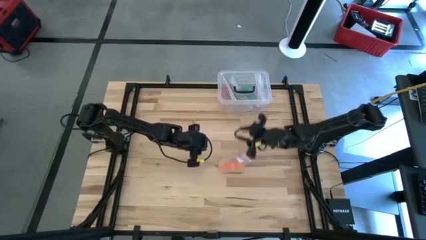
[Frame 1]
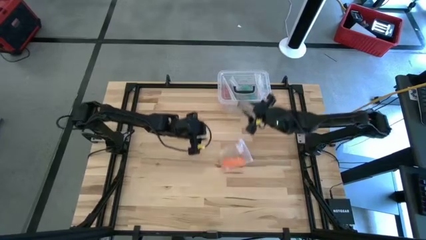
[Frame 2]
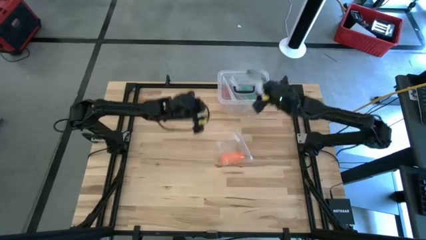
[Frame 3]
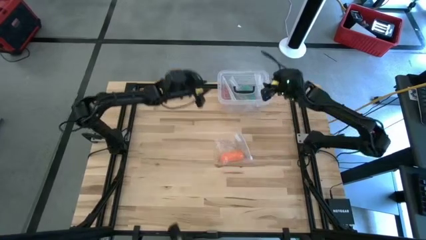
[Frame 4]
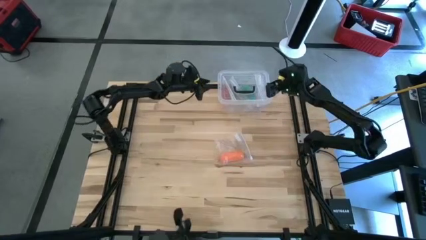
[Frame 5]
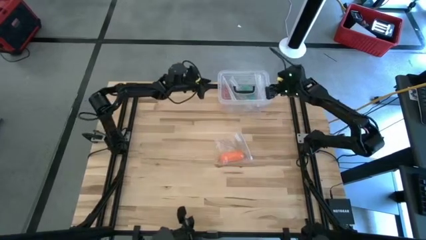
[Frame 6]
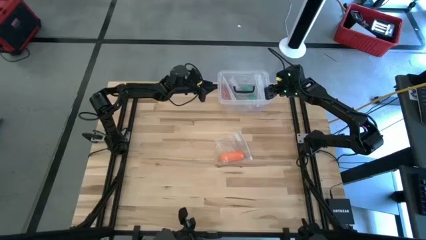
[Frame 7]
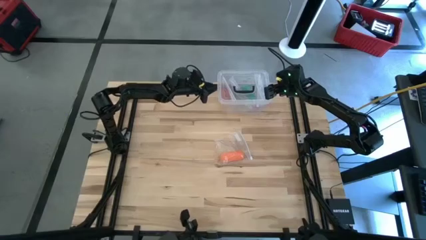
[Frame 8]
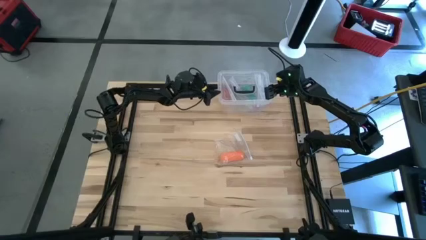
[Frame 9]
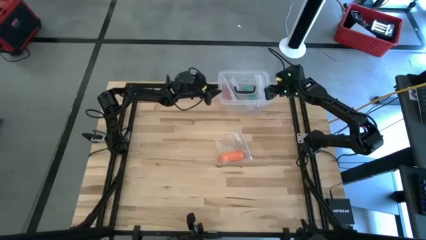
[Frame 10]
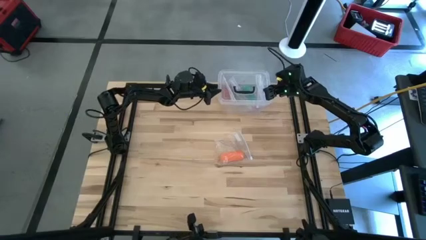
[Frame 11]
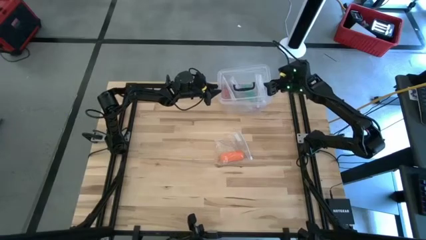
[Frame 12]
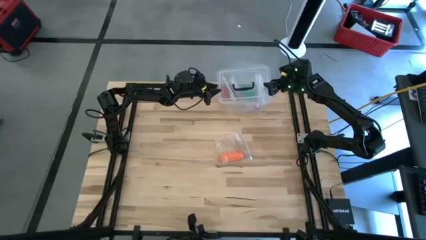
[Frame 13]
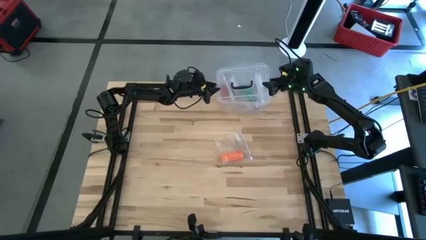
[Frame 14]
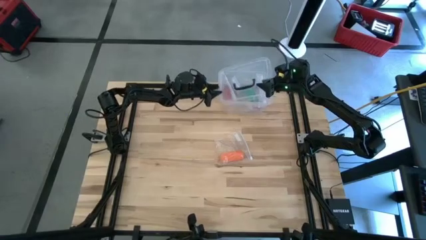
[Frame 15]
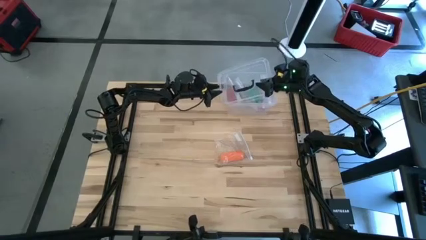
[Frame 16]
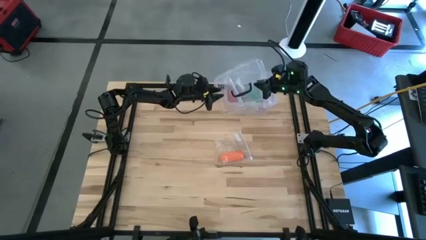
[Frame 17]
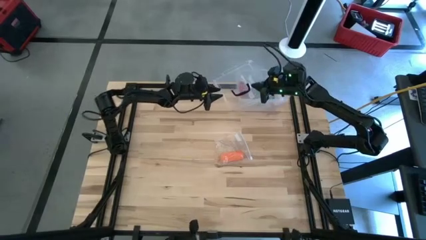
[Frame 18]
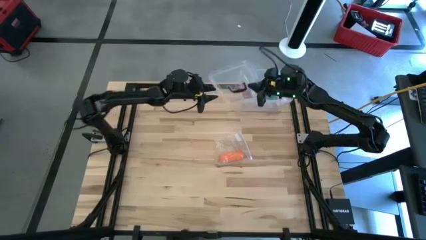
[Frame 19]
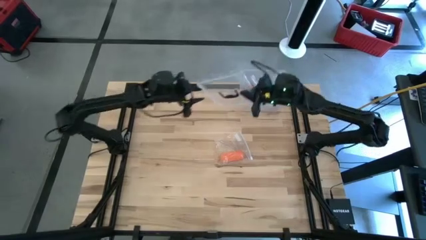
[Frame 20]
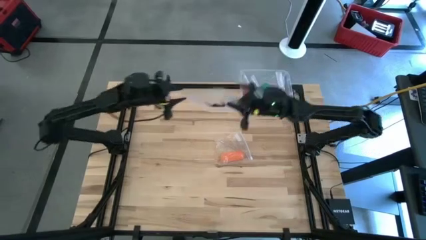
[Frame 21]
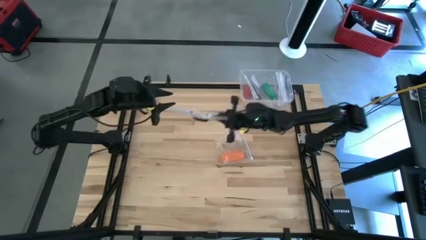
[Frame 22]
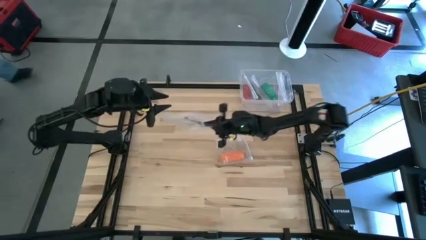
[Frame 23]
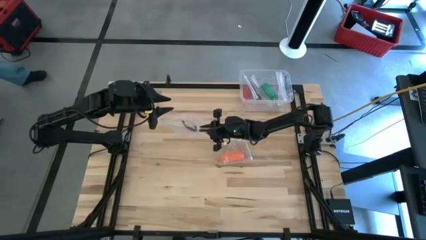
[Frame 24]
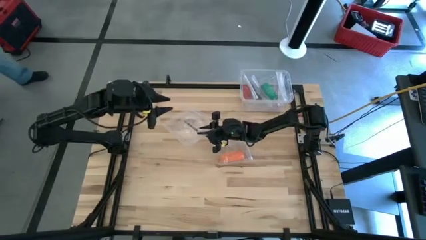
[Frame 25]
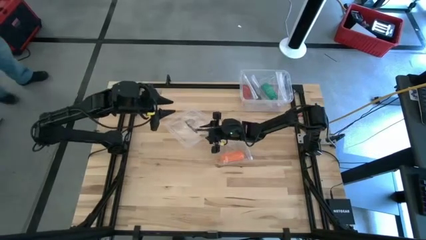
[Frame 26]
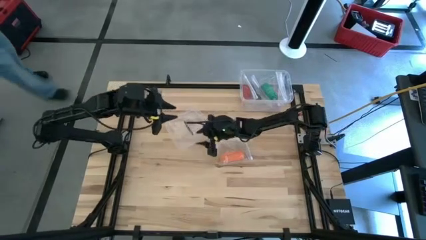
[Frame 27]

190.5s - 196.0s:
Task: Roll bandage
Open the transparent bin

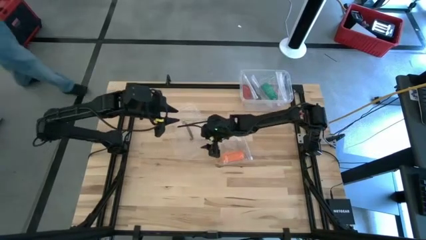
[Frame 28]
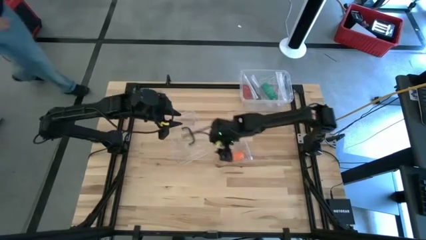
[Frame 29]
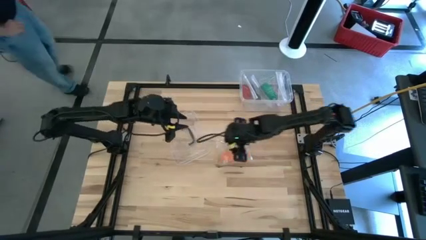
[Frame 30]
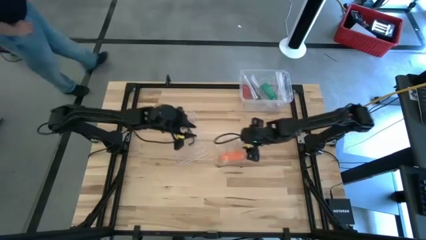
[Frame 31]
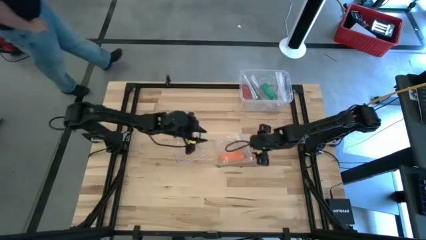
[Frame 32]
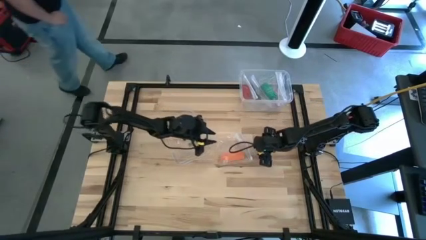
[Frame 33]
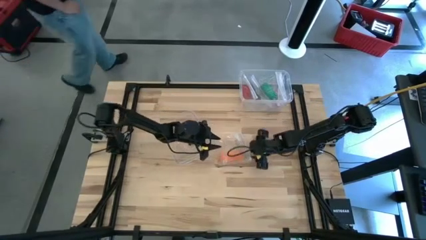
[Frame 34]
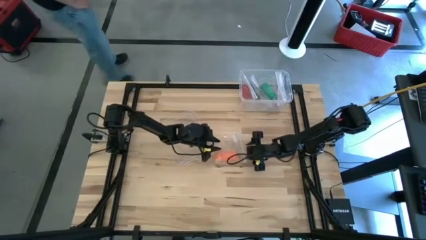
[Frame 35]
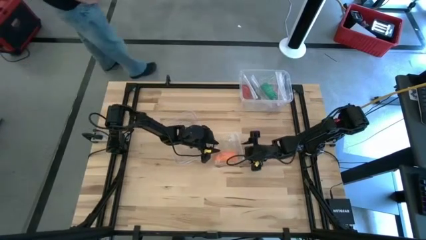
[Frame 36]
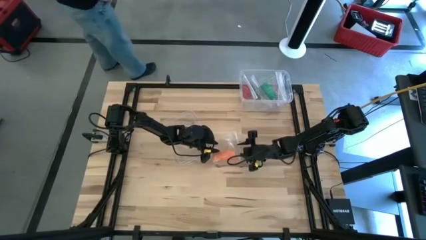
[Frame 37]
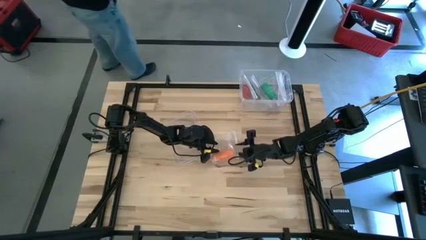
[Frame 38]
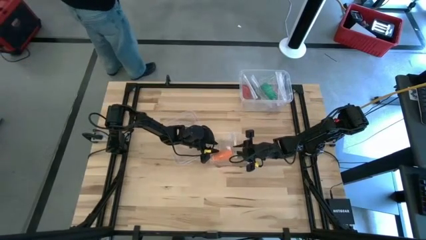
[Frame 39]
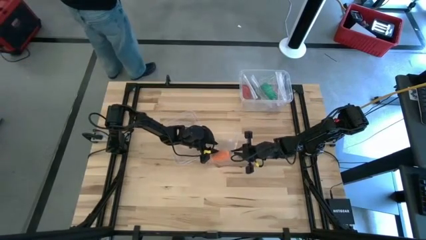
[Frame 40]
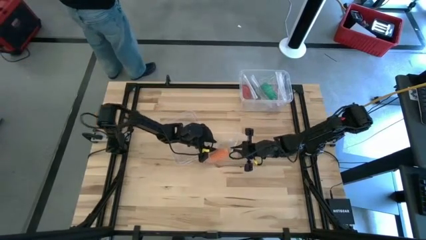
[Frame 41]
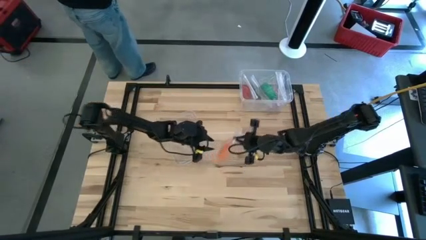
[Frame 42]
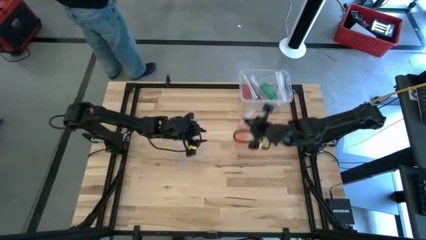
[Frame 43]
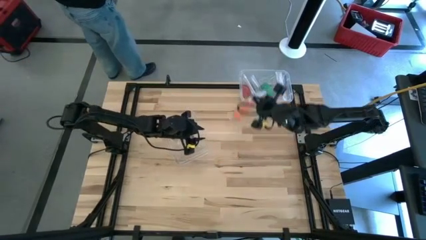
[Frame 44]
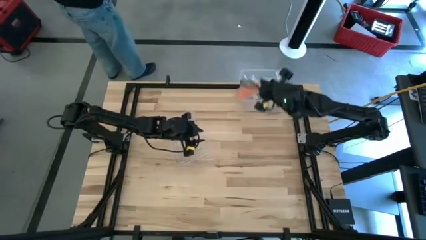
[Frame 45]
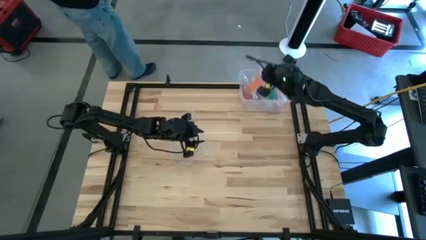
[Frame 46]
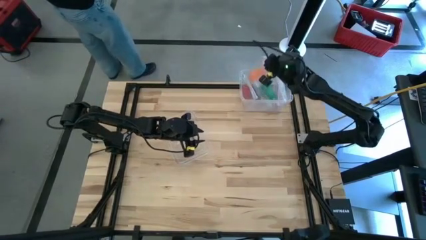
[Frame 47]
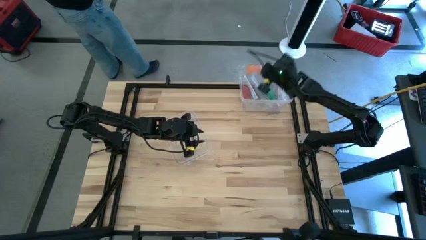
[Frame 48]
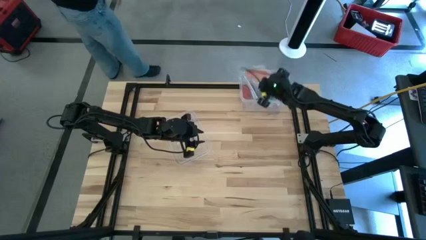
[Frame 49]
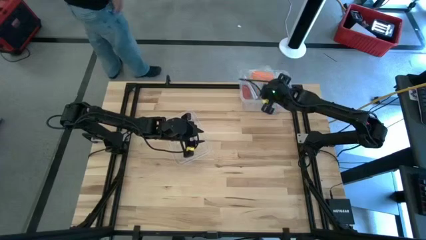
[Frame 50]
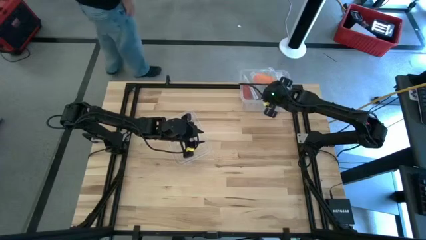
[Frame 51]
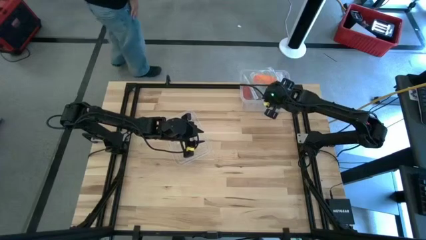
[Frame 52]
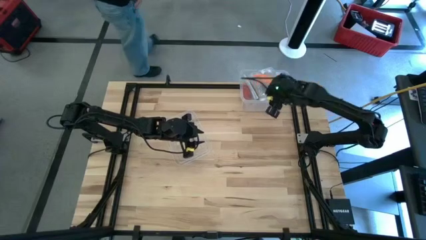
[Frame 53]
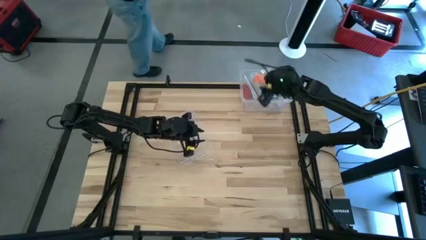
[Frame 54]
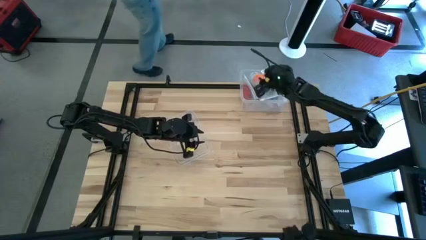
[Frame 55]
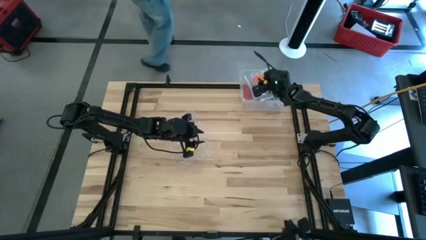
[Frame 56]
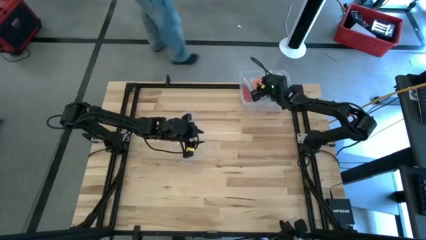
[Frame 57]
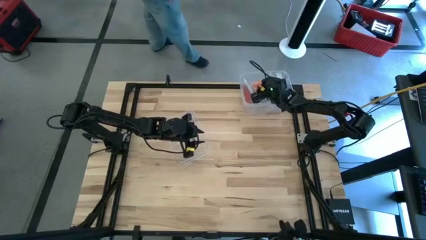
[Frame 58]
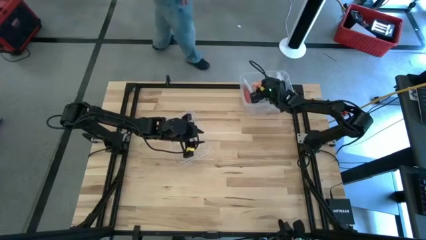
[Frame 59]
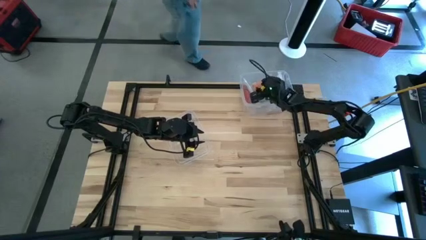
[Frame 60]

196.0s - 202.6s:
Put the zip bag into the transparent bin

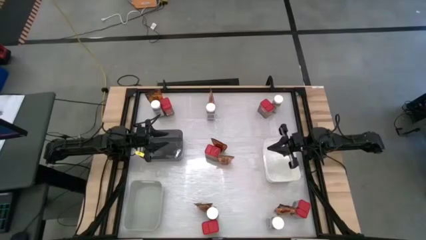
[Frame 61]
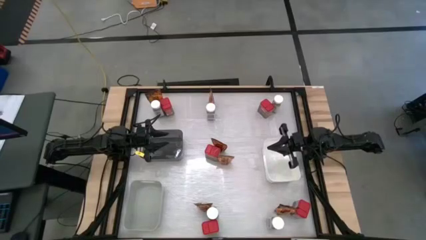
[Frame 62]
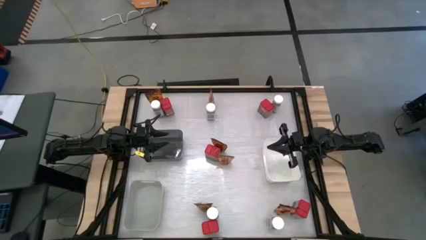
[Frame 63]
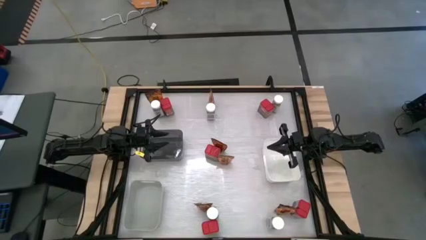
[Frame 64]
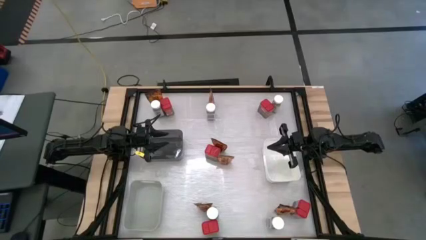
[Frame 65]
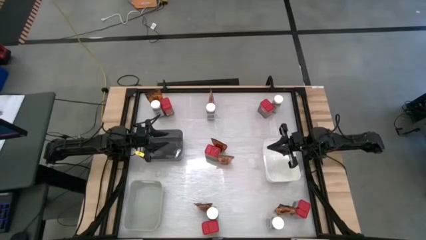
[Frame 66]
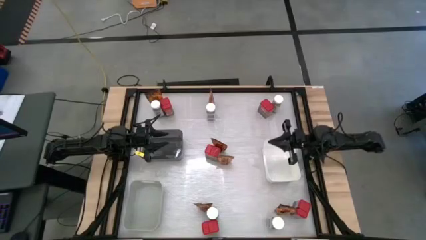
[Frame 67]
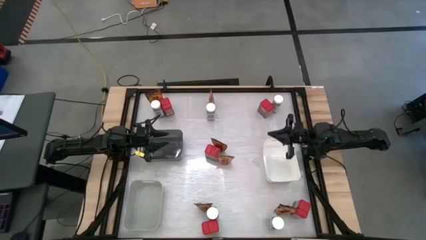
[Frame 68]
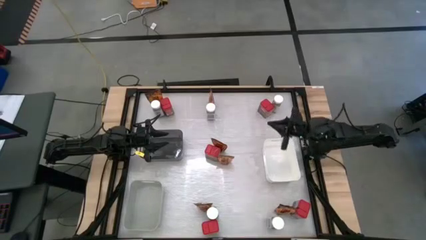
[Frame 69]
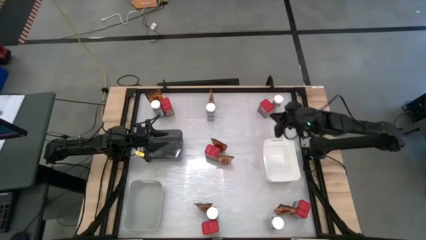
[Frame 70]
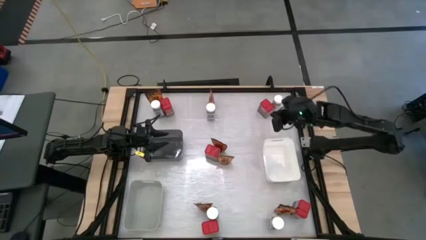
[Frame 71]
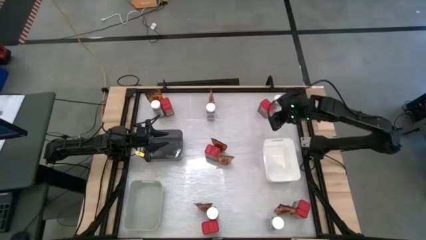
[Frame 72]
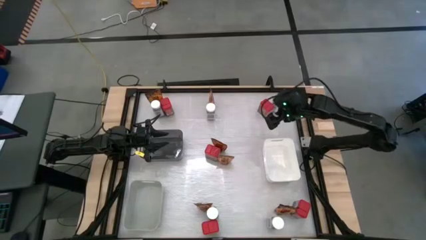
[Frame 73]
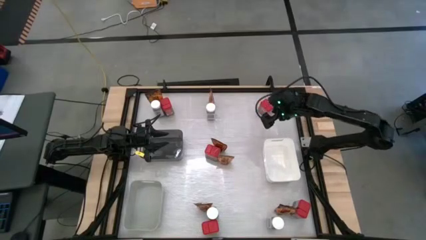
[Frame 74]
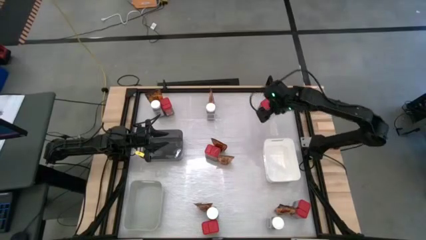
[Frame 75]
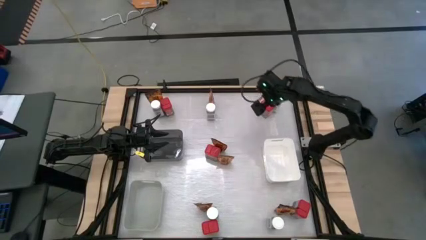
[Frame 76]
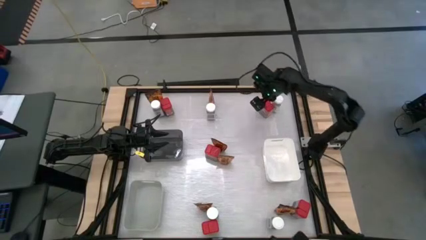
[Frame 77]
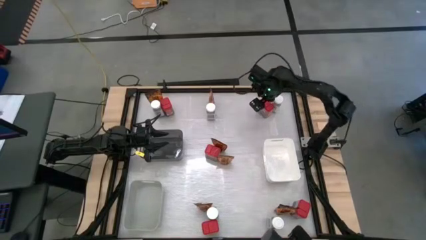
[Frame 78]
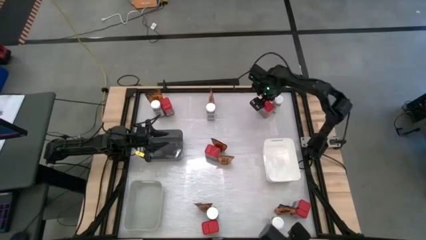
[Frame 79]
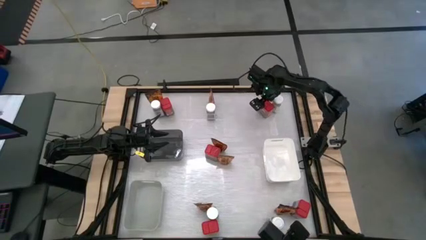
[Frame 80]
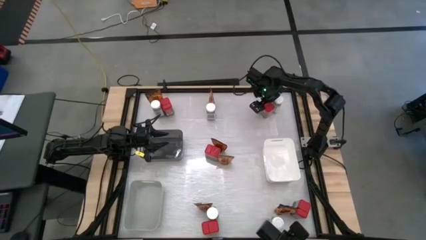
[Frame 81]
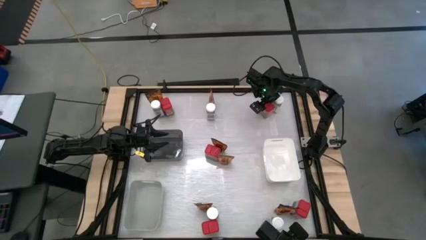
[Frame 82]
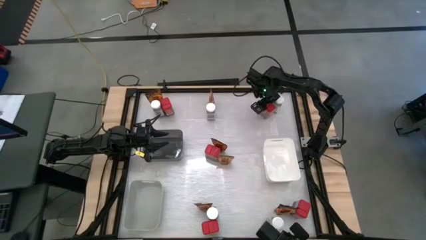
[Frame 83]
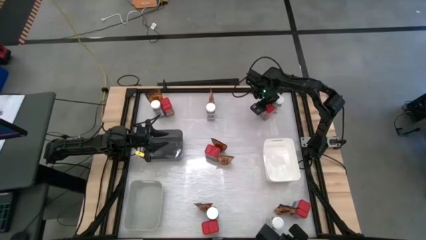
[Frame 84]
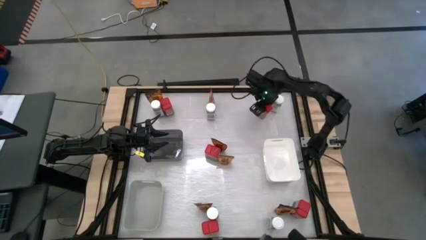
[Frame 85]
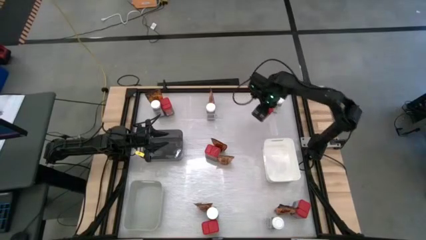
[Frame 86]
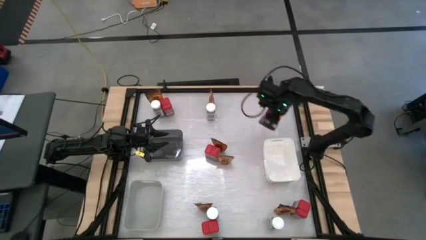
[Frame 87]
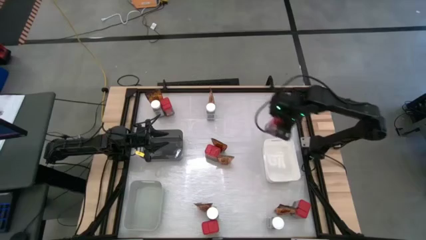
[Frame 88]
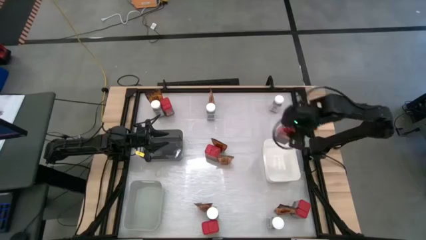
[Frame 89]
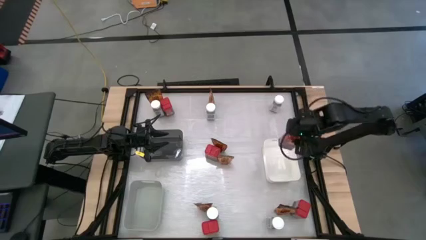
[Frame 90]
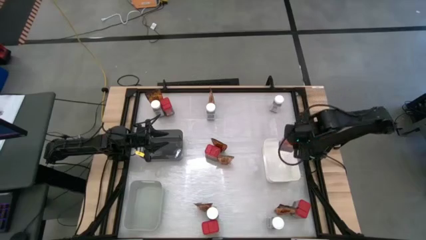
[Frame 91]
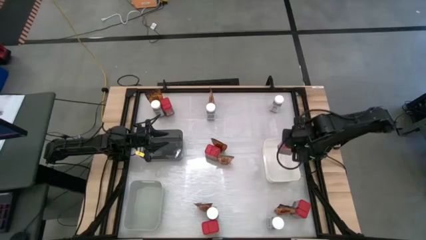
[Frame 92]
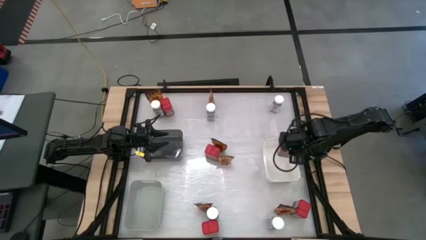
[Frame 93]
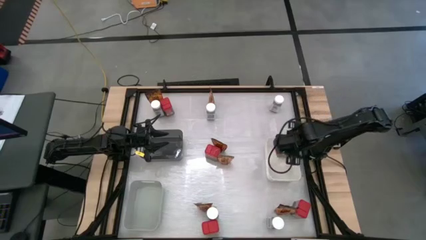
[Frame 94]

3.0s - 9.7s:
Task: Sort spices by type
Put the red spice can into the white bin
